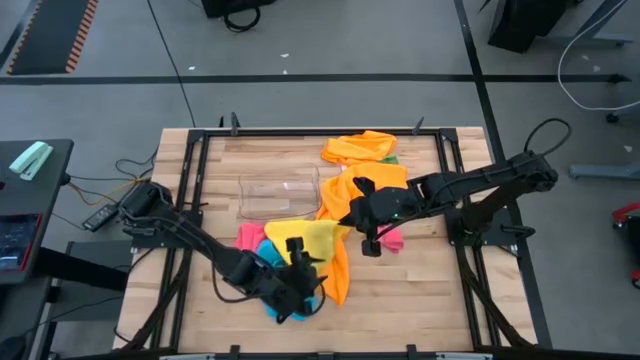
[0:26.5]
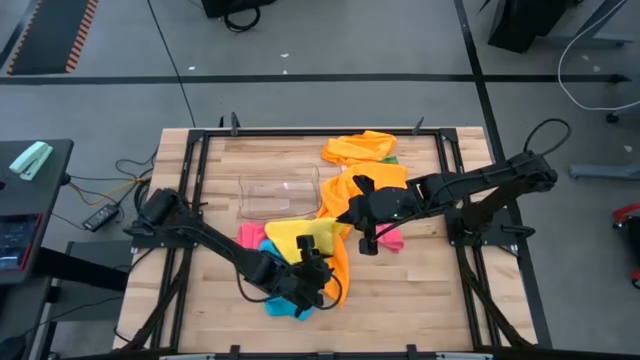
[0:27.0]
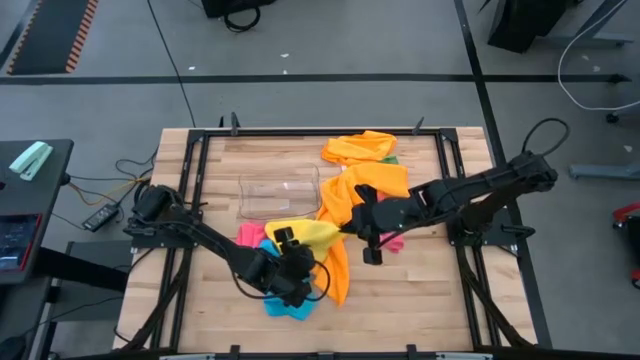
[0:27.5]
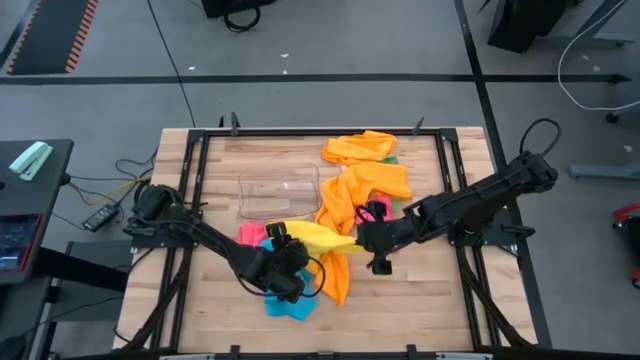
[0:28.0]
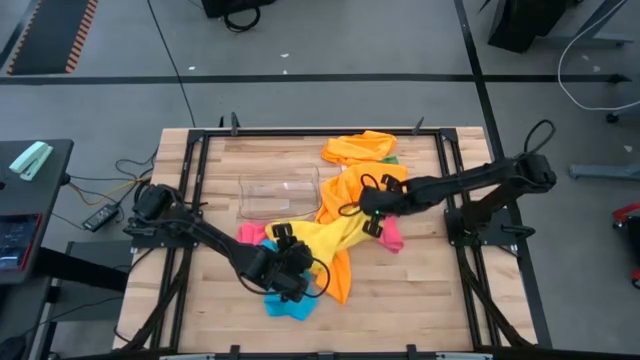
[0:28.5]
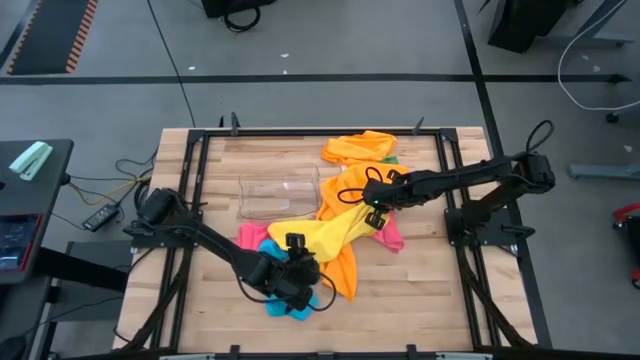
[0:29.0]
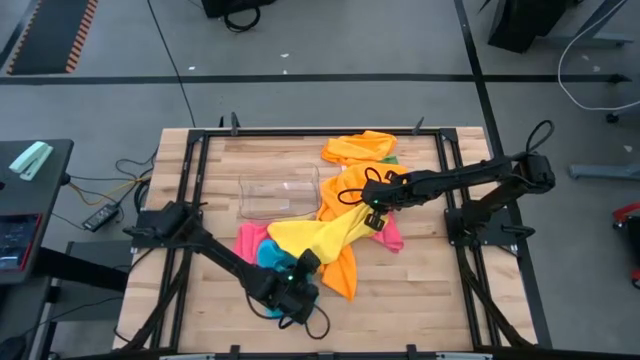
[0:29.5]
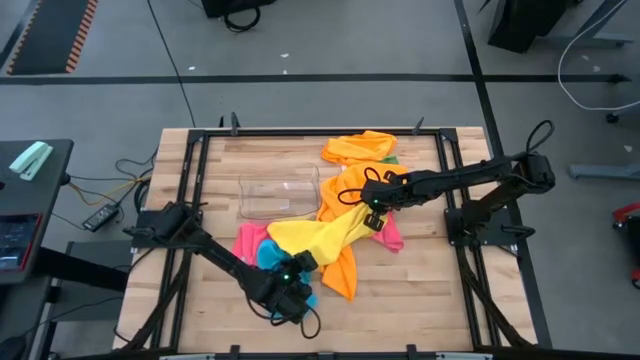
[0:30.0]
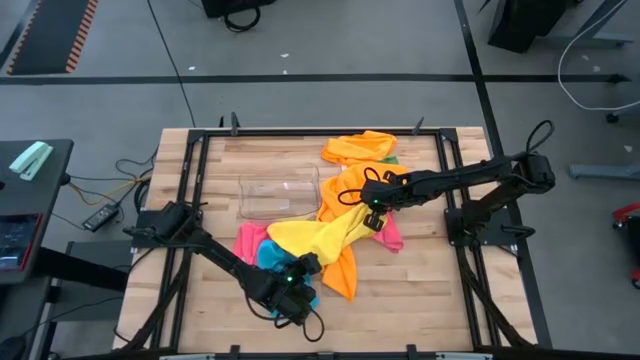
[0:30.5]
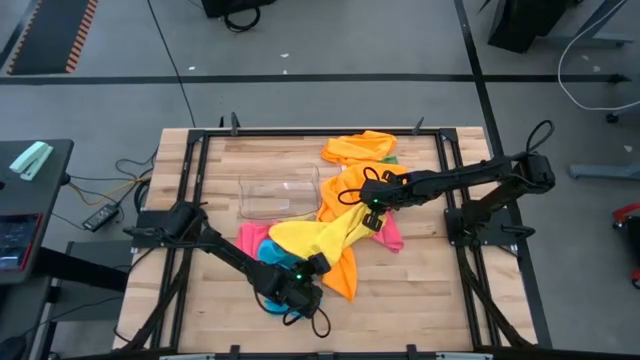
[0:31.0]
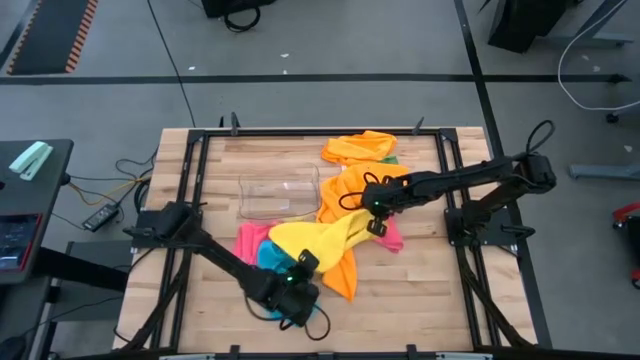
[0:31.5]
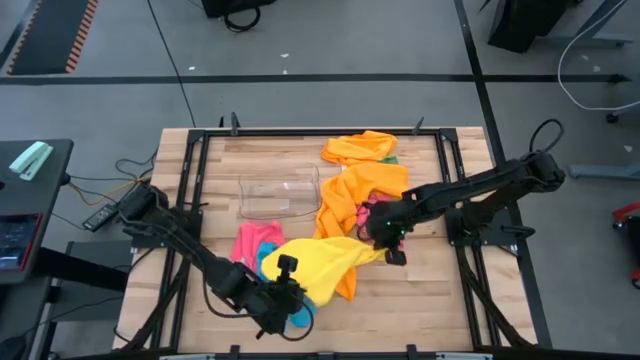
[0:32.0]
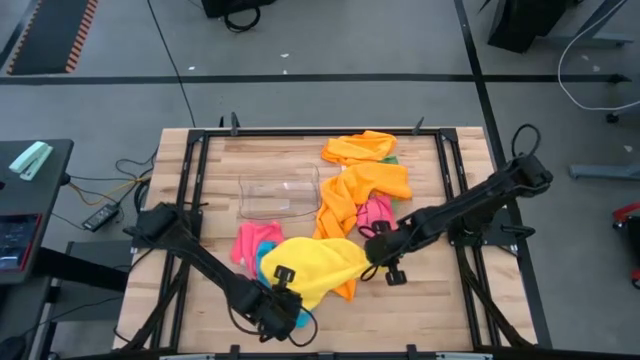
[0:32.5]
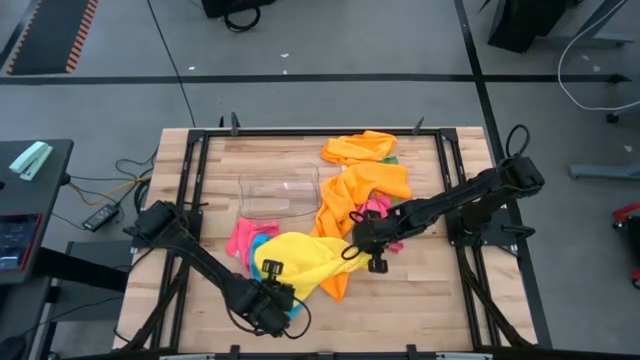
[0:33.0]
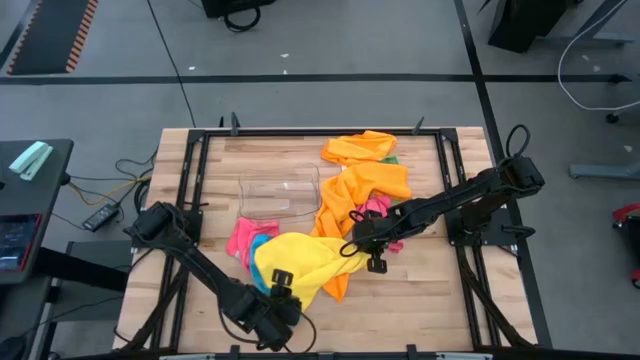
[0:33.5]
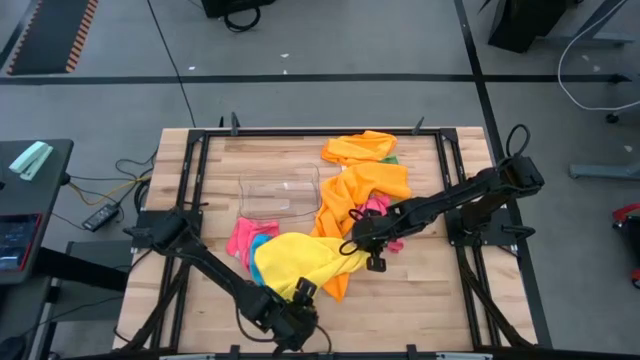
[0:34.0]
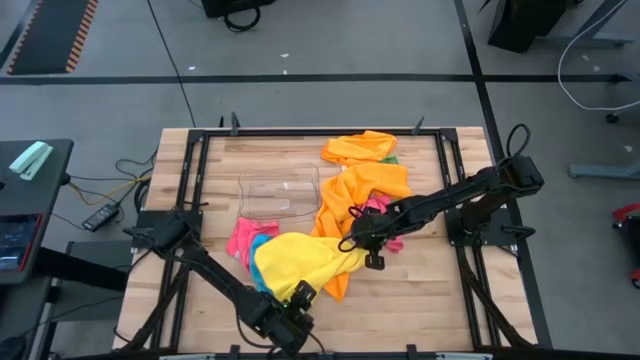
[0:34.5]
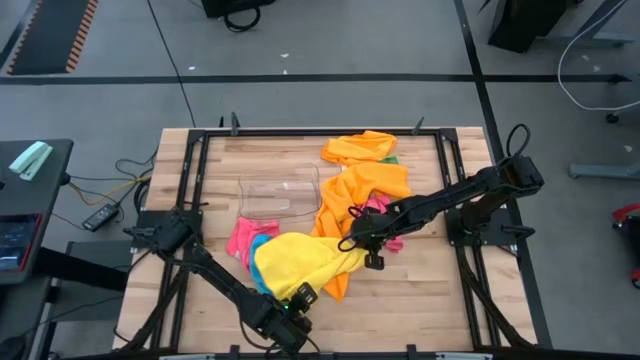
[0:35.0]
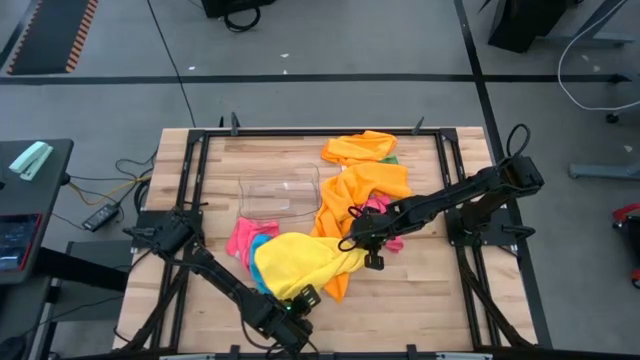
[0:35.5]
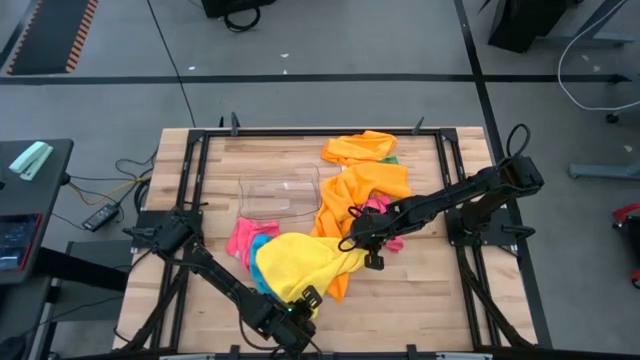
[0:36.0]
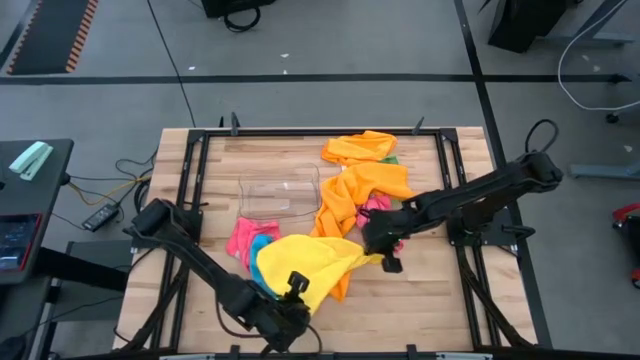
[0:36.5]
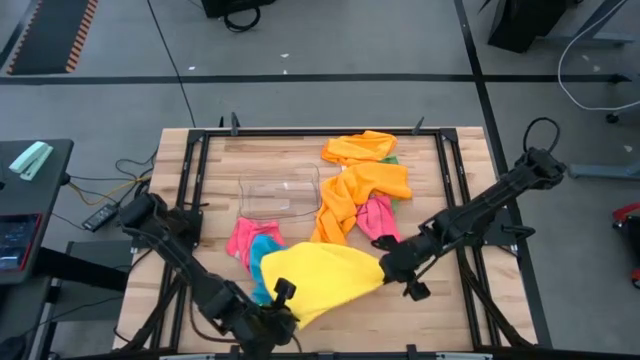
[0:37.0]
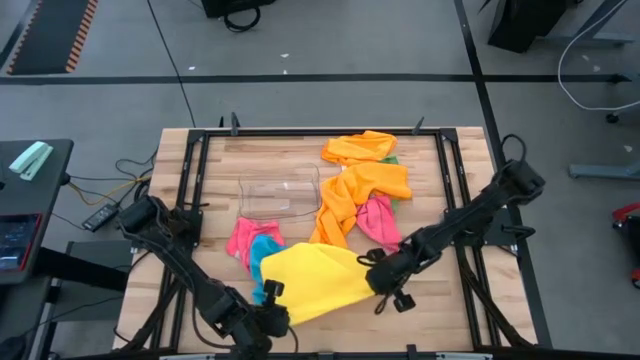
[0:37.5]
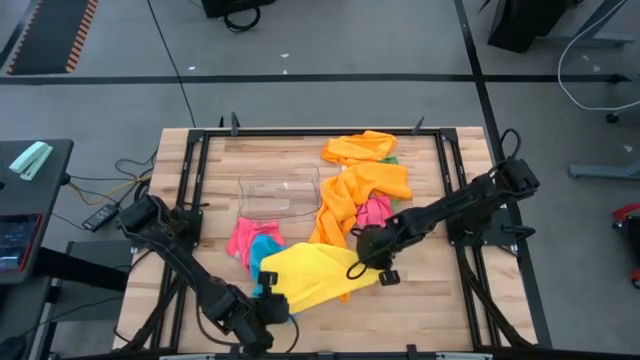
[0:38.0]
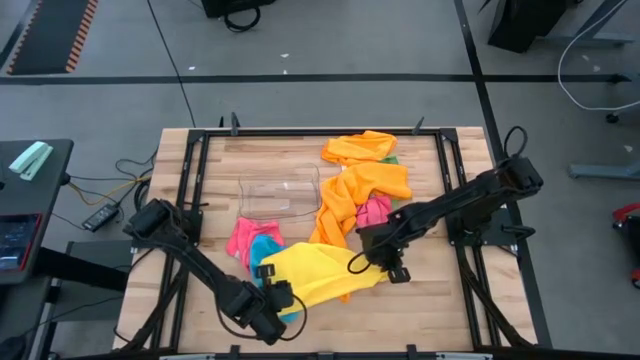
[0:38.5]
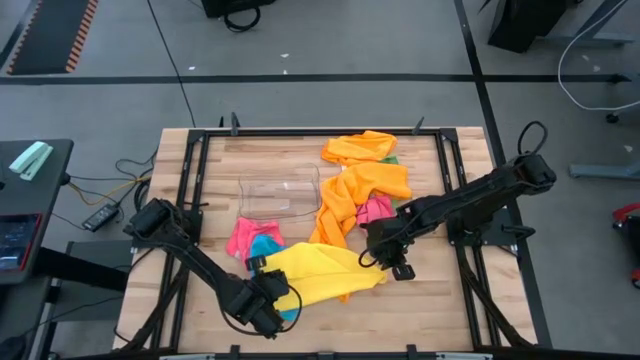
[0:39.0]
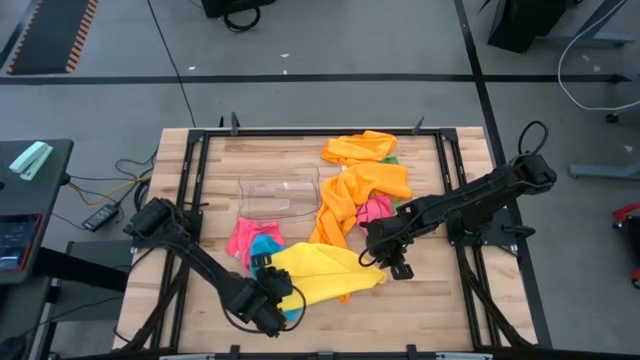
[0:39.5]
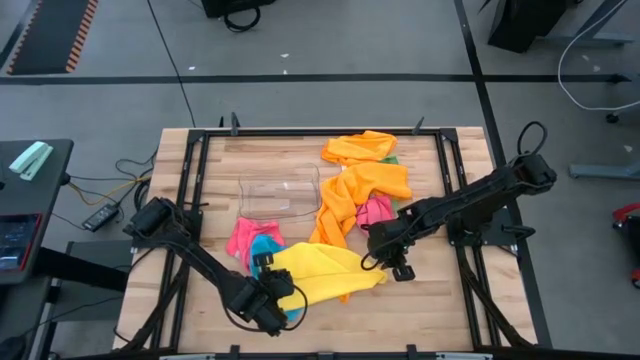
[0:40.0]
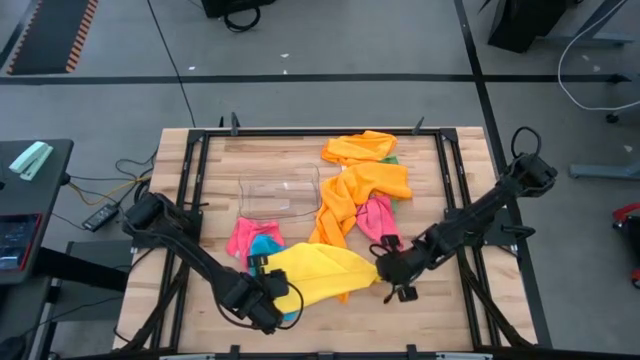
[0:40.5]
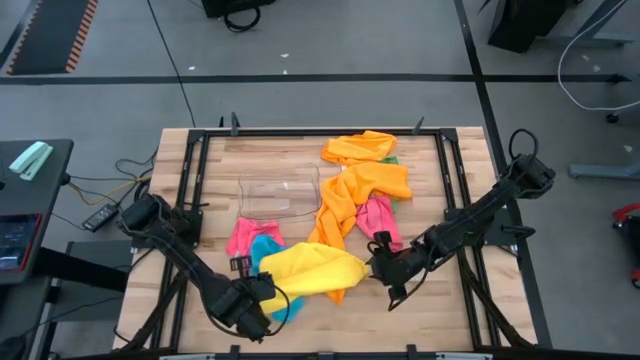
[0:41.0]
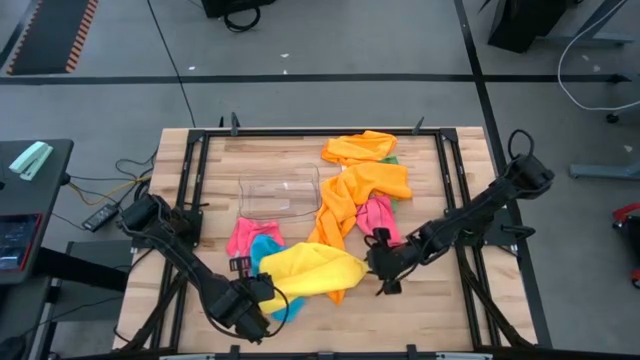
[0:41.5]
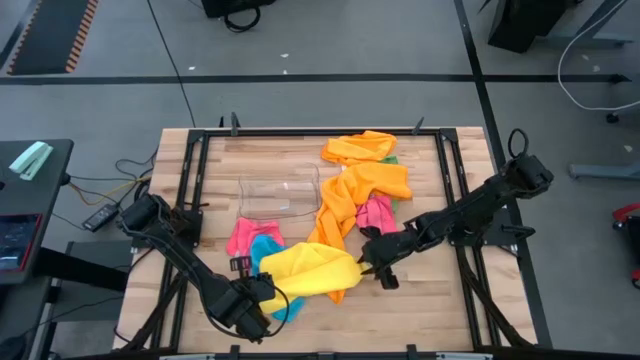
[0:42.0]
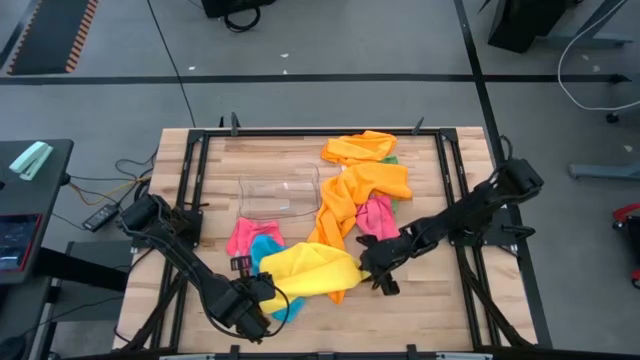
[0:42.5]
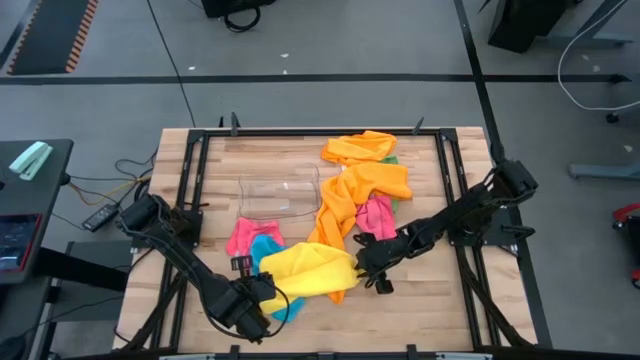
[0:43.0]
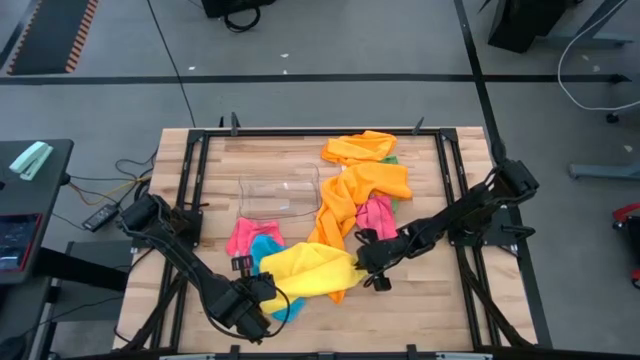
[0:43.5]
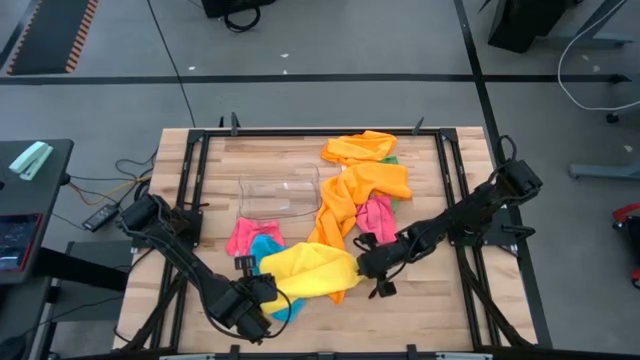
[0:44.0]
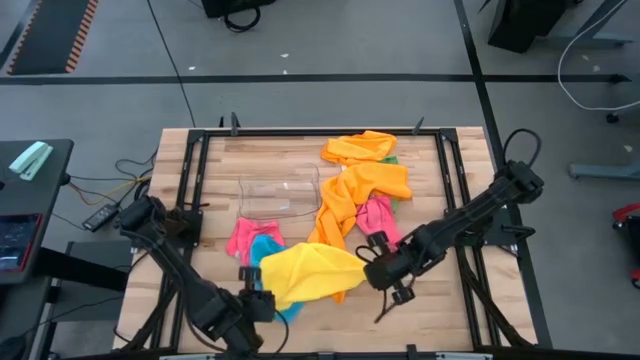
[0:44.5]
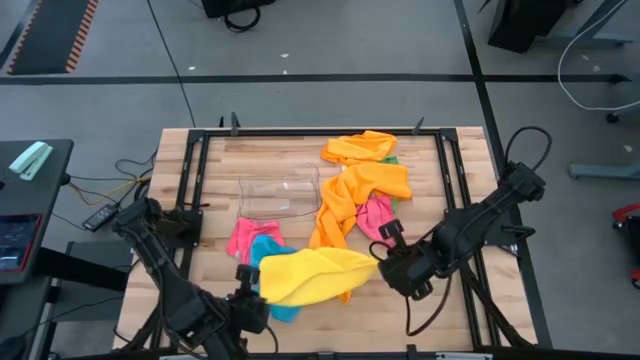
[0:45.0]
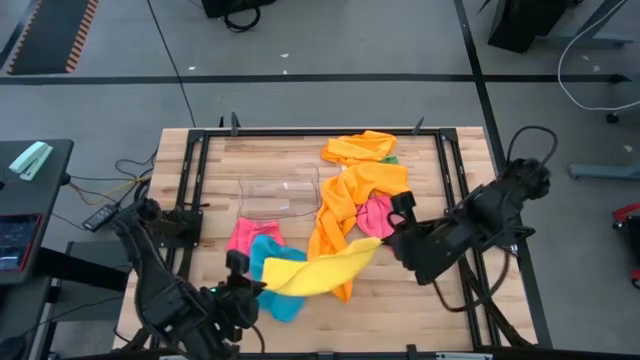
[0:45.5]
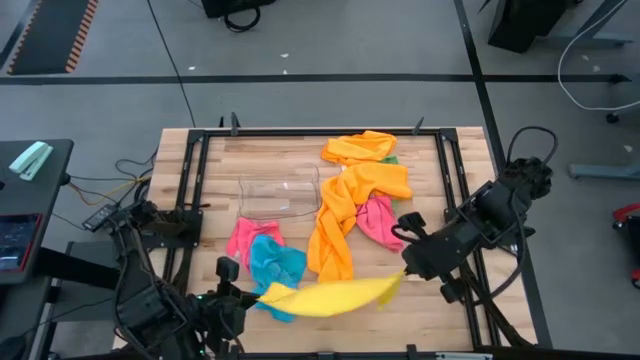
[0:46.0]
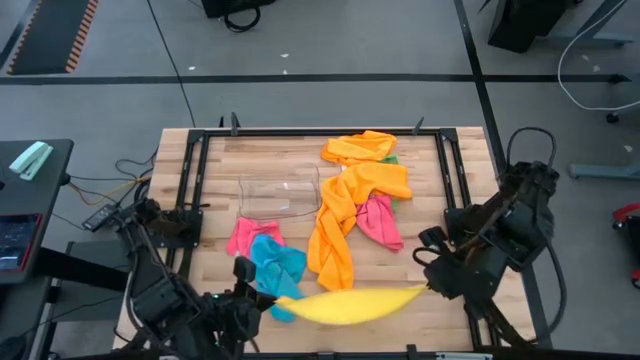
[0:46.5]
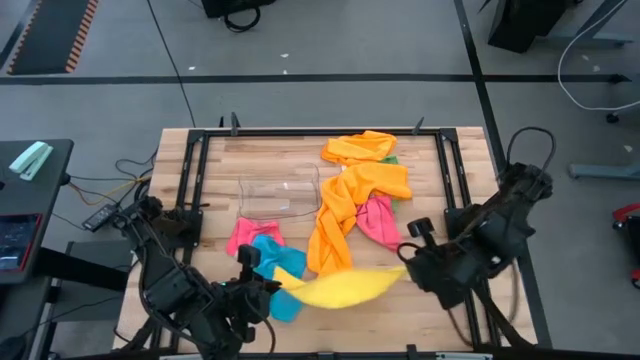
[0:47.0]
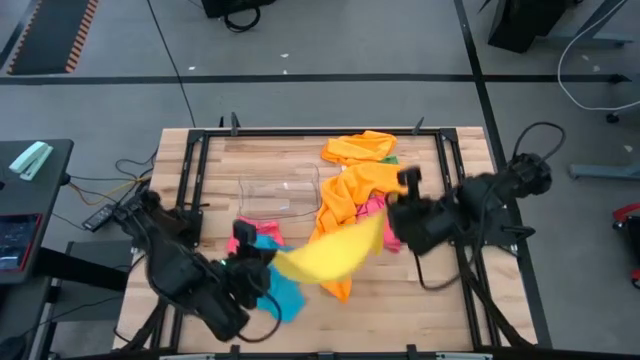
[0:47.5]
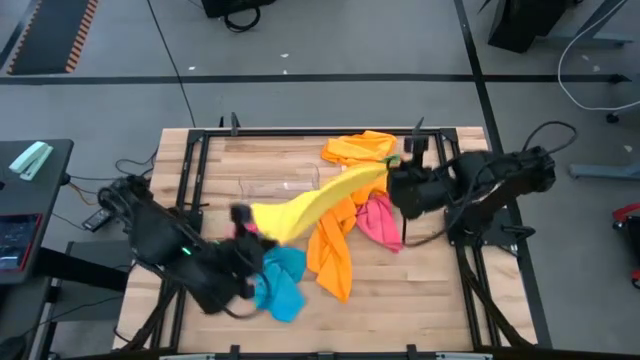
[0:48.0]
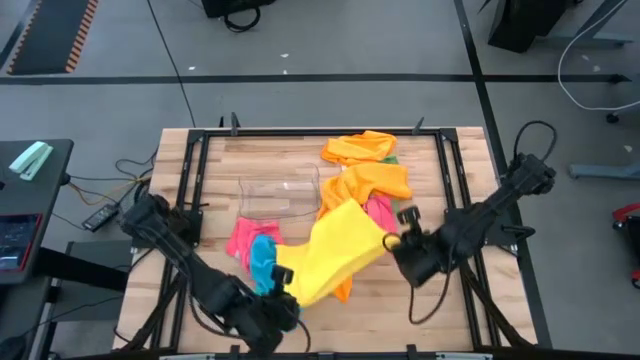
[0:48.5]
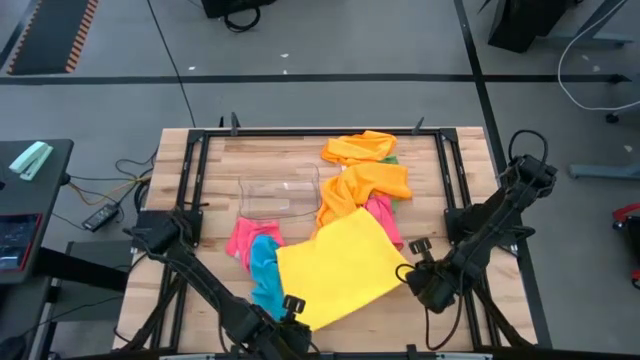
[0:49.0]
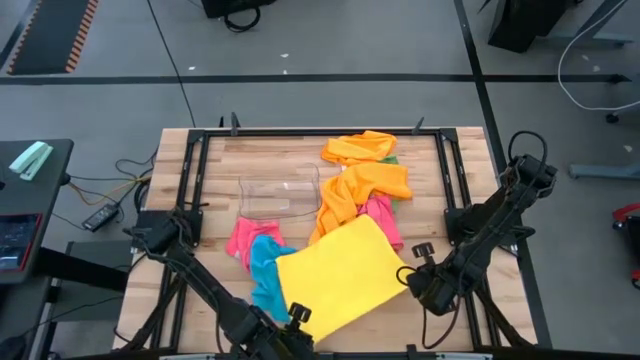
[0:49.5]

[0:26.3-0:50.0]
Task: Fold microfiber towels
Fold the yellow microfiber cloth
